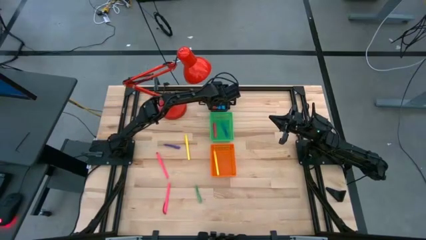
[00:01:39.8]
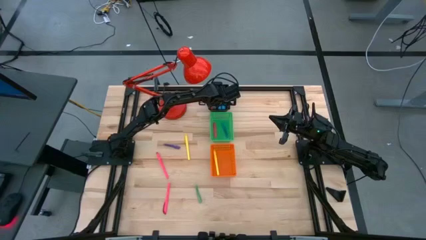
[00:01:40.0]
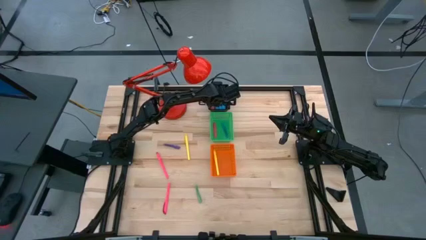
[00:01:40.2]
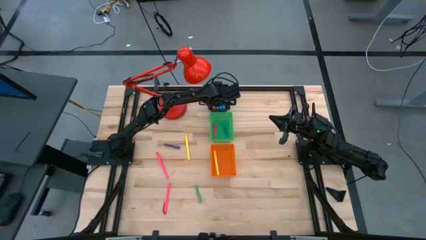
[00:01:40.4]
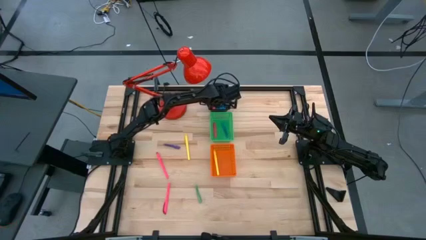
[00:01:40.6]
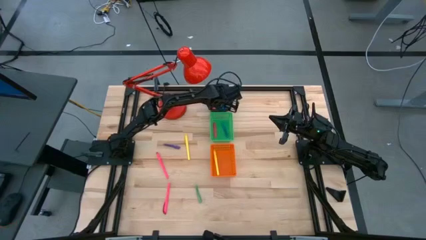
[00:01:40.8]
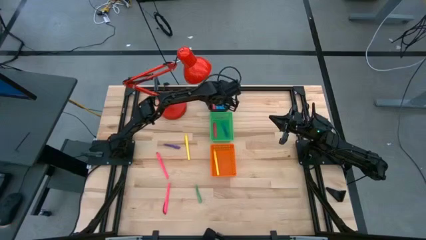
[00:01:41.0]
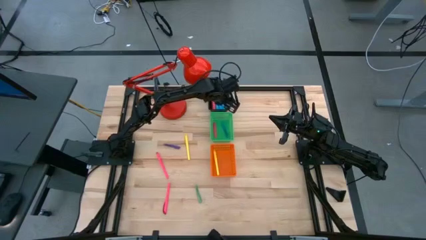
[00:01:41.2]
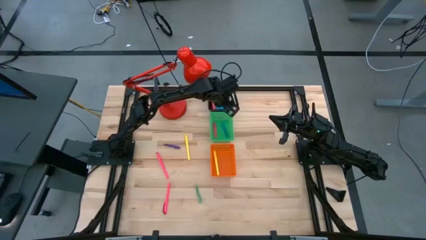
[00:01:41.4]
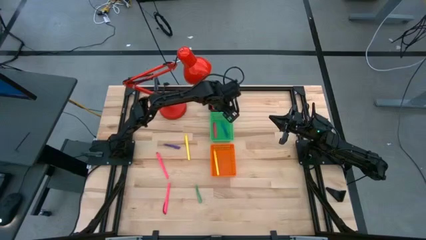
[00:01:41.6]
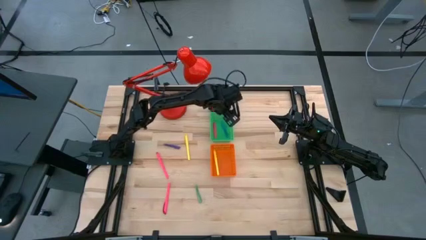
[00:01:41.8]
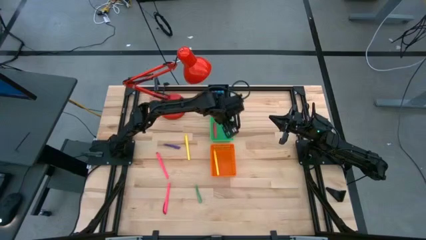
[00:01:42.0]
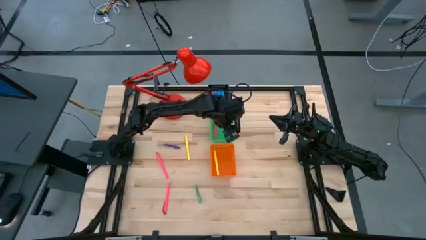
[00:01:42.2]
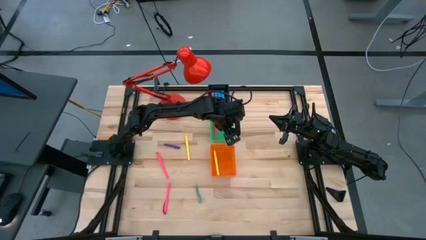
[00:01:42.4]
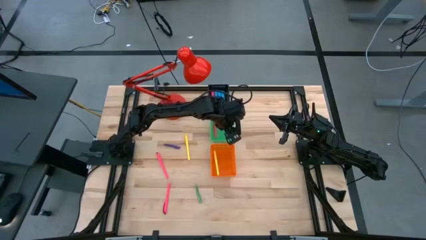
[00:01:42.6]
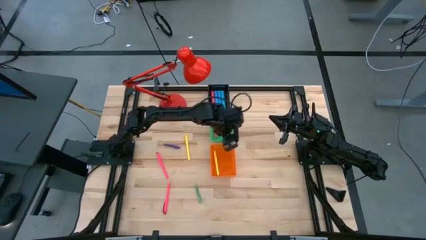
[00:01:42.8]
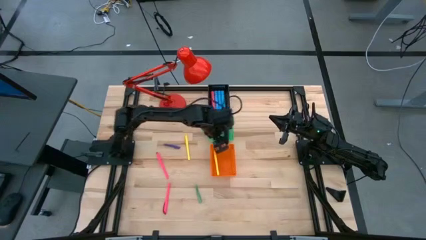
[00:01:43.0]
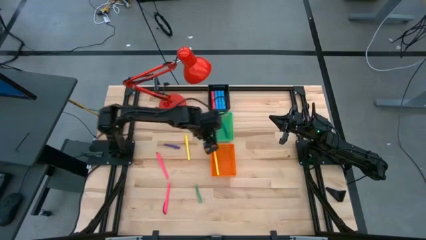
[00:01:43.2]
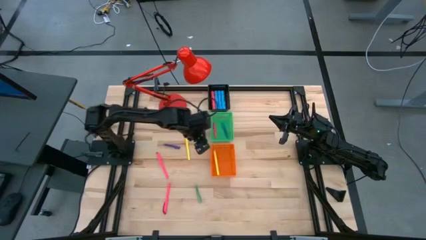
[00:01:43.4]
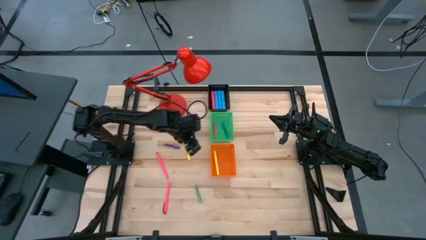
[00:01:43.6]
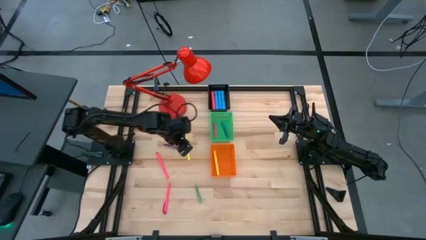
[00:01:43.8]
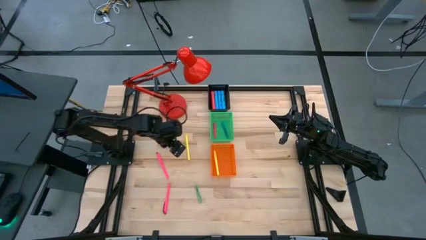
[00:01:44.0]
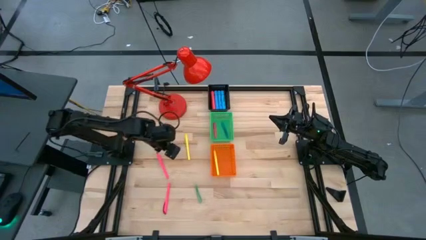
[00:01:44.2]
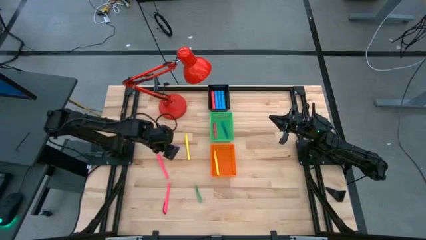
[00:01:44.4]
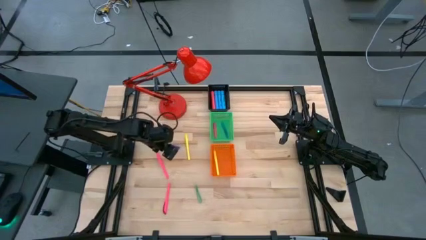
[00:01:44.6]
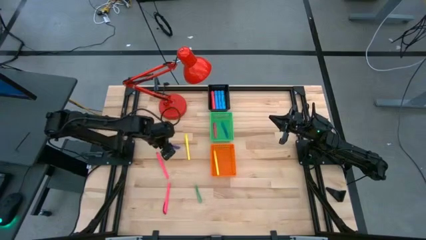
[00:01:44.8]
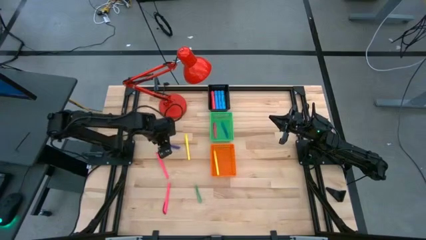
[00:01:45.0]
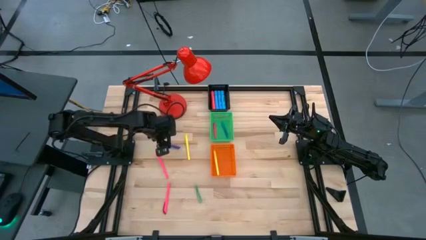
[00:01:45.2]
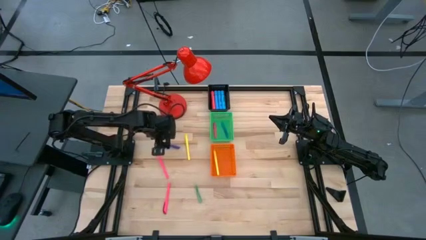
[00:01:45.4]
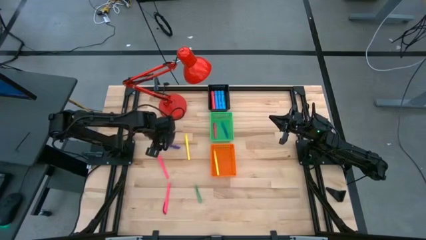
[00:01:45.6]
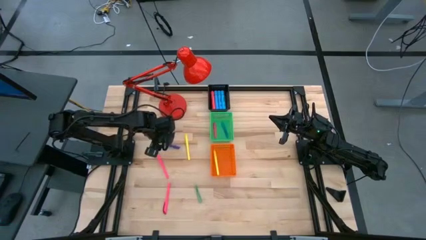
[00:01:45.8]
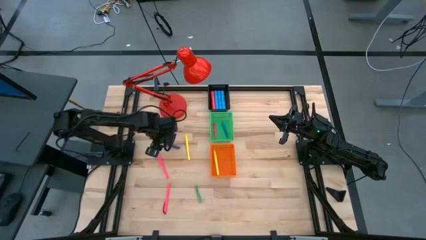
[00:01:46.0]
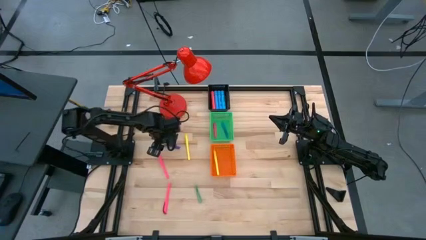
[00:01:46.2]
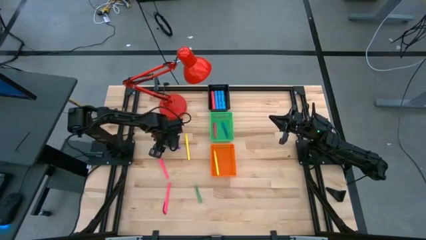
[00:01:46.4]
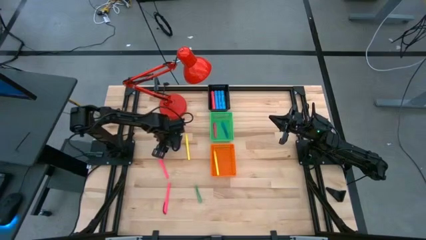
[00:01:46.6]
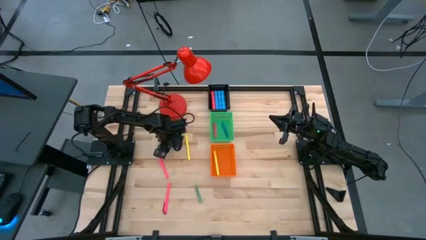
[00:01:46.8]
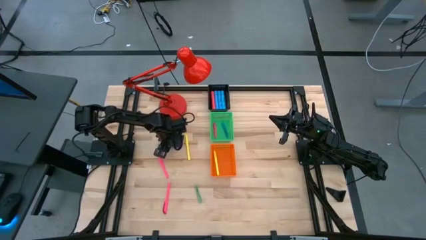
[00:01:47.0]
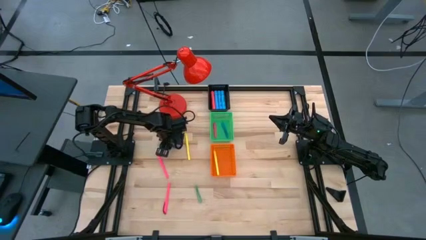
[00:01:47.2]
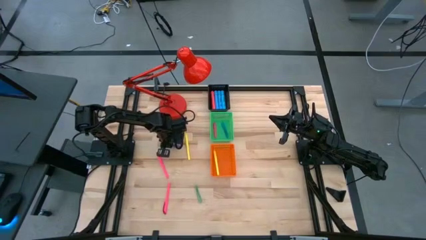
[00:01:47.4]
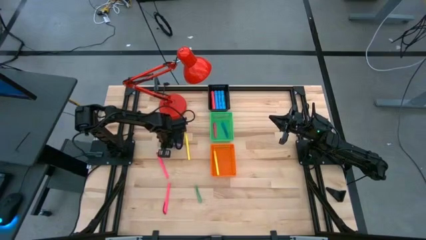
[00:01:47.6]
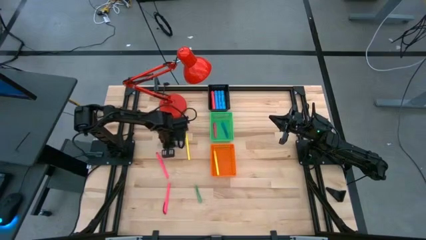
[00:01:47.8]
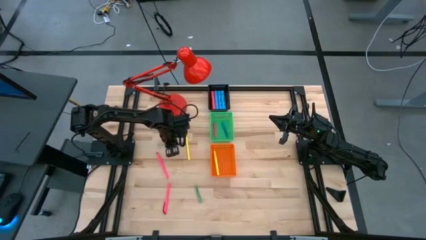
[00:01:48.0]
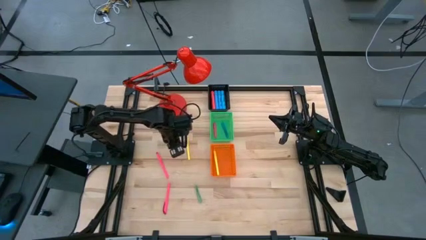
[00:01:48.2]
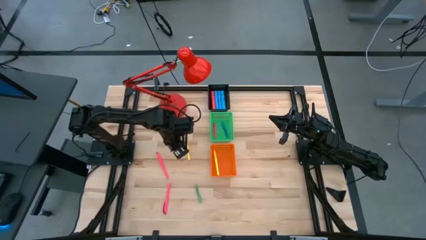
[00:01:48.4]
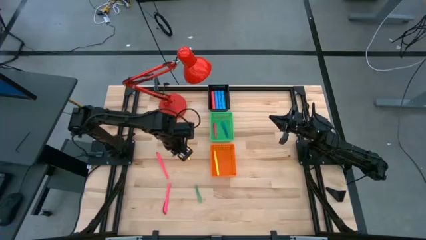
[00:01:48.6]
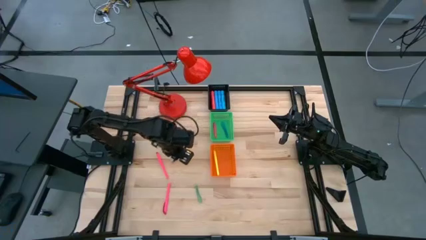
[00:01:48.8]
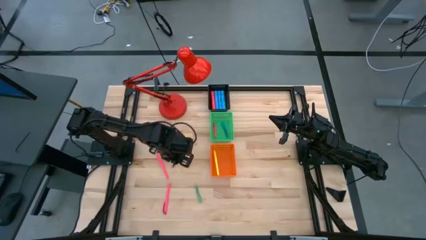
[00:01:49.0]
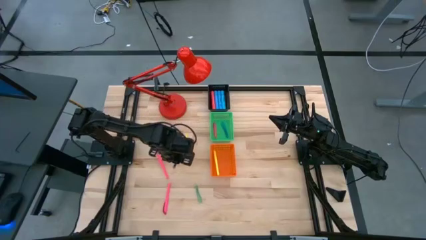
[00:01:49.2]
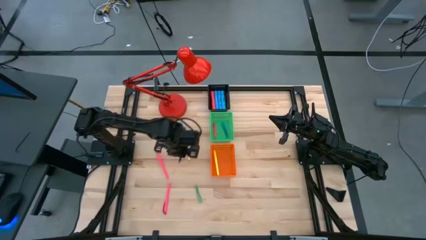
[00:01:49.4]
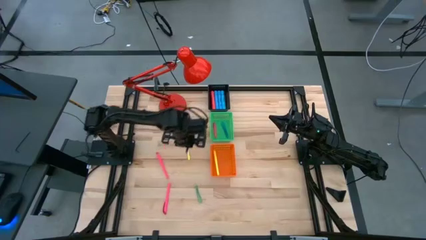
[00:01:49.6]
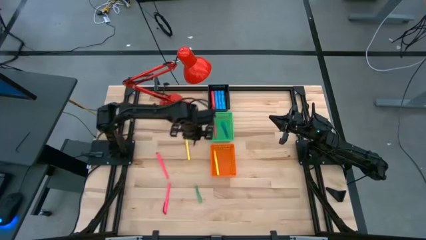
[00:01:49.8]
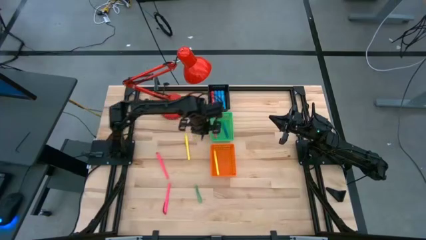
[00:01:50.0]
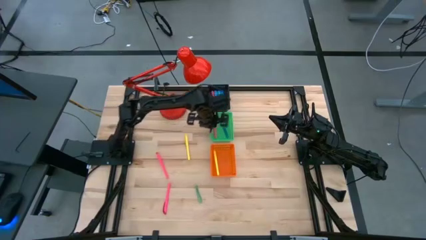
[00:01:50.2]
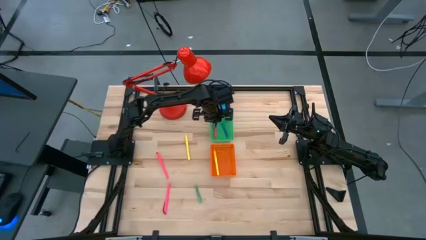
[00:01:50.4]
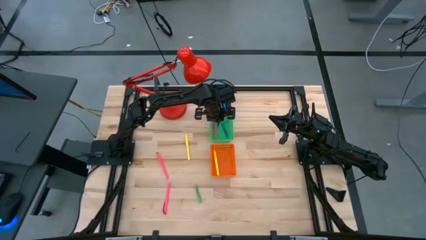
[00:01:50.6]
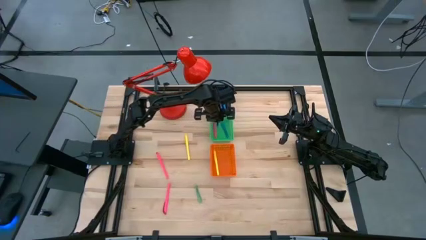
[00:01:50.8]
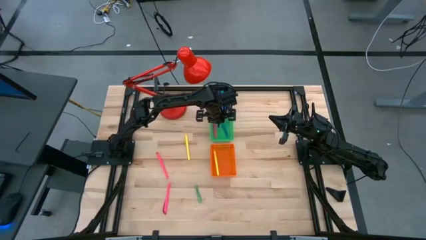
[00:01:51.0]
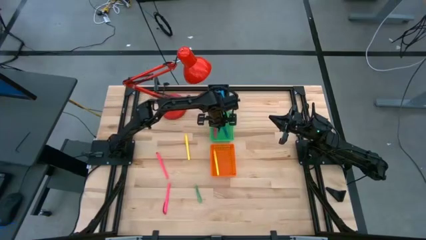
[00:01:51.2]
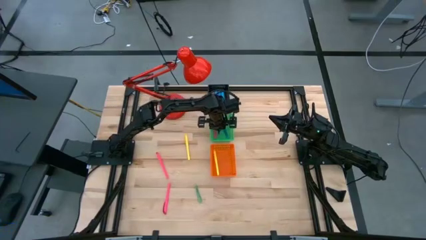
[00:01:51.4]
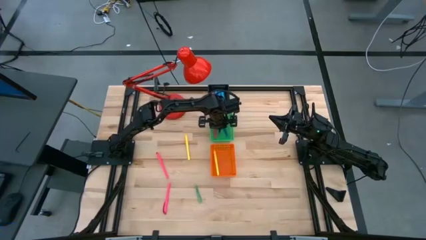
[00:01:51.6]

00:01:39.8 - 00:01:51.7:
Task: Pick & Place Markers
Put the purple marker into the green bin

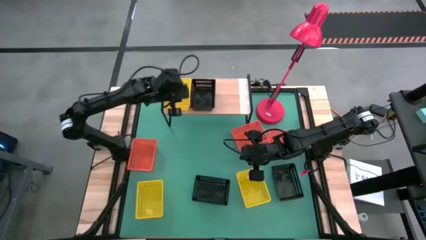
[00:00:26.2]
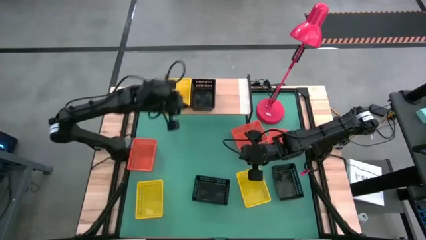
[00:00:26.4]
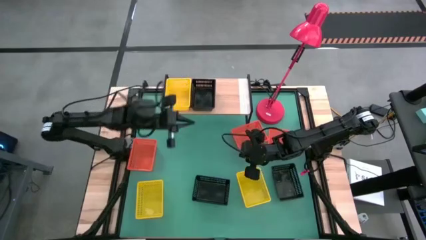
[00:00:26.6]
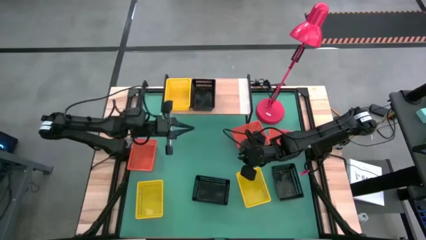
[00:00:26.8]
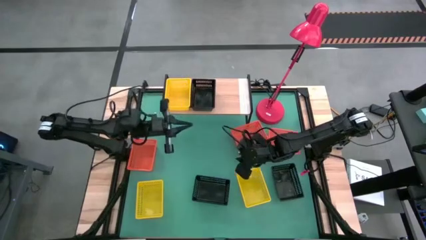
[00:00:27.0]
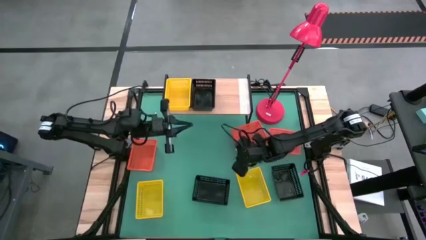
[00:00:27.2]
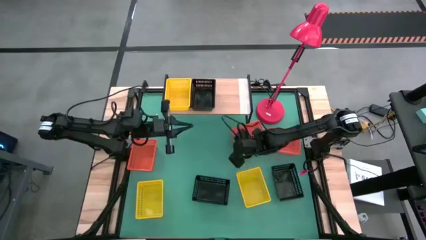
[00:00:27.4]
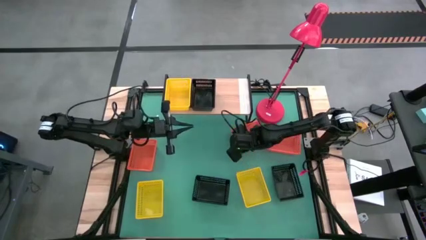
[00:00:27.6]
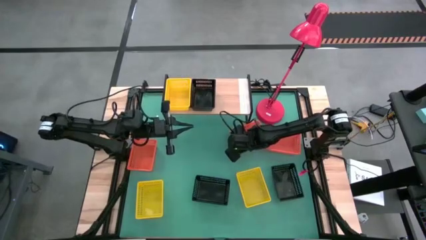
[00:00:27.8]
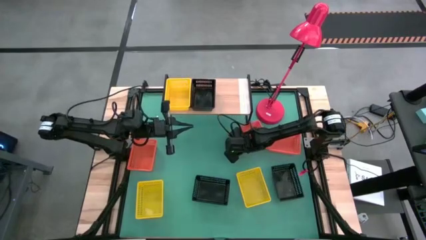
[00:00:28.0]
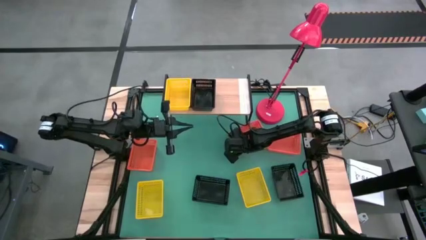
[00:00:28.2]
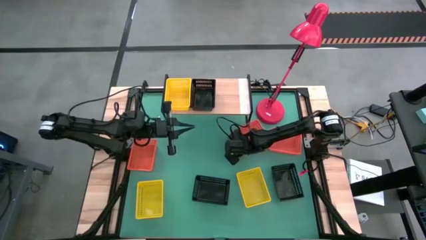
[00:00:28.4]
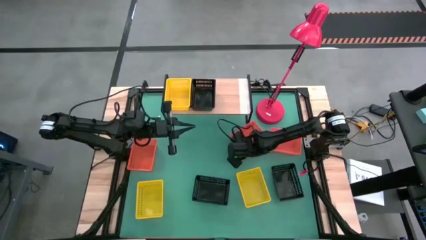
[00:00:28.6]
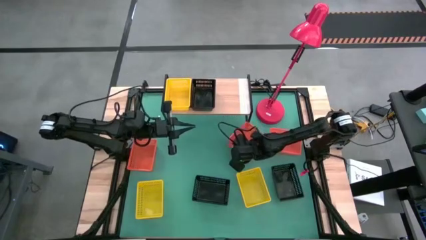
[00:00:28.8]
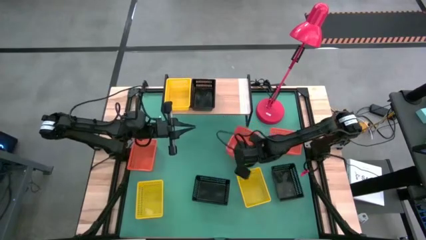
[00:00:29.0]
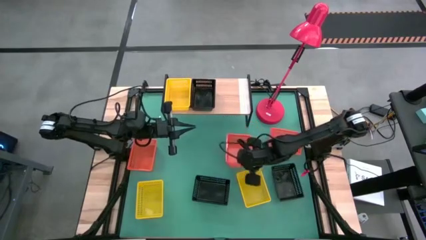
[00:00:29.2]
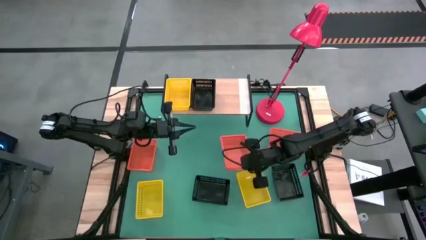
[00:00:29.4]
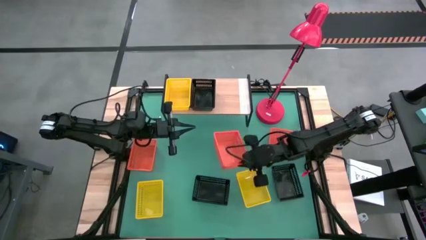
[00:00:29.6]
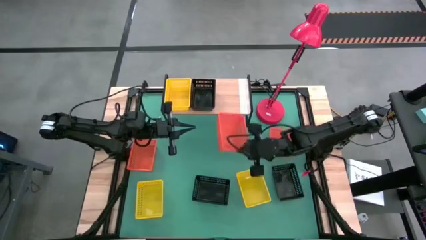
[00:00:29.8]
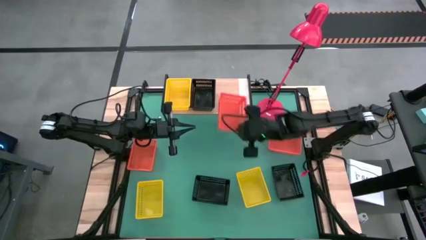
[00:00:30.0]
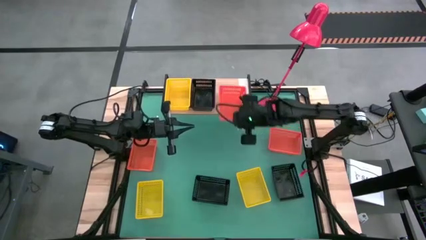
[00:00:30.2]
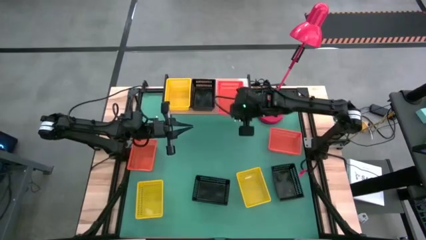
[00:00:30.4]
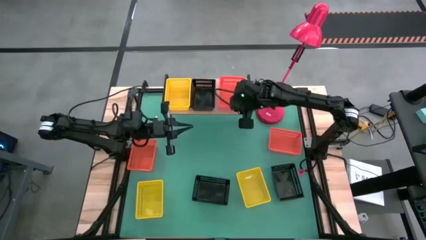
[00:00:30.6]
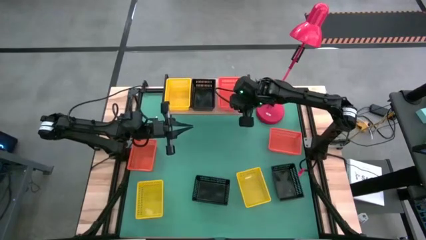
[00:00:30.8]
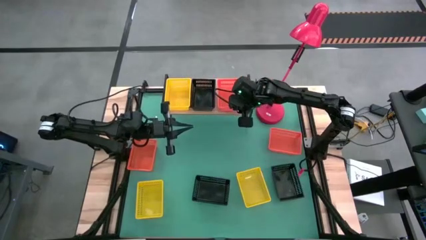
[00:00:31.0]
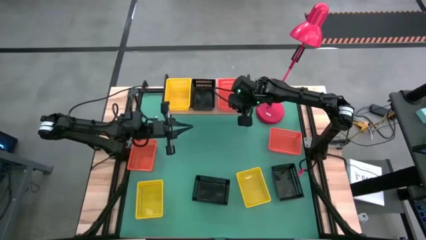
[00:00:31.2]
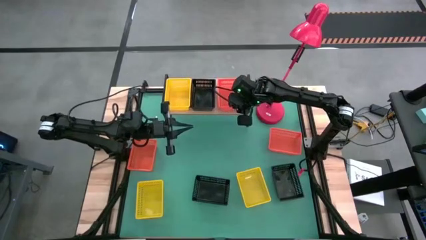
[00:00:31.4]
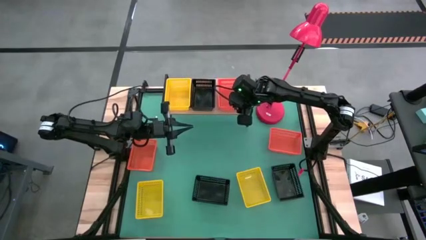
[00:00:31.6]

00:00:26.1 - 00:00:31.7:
Task: Stack baskets on shelf by color
Put the center orange bin on the shelf
